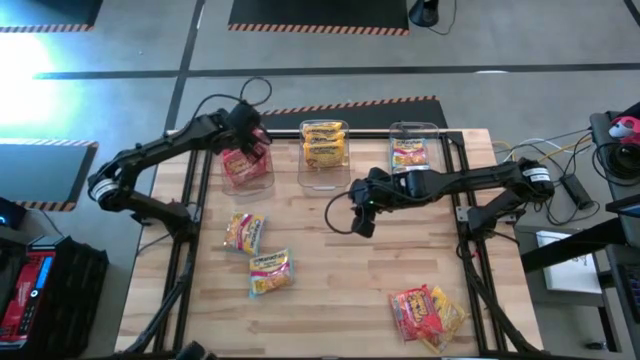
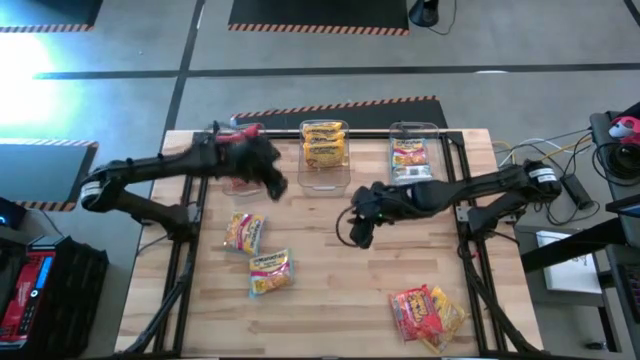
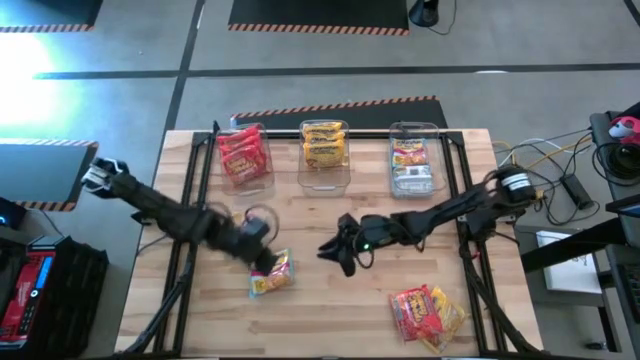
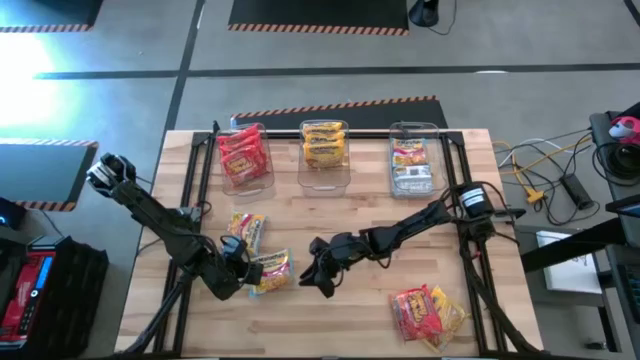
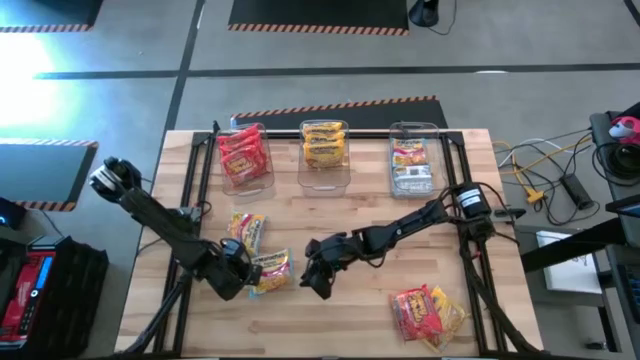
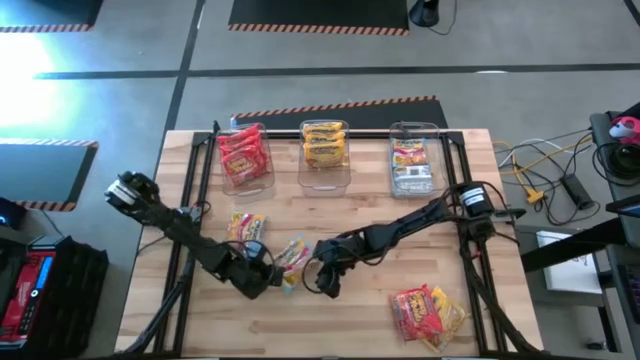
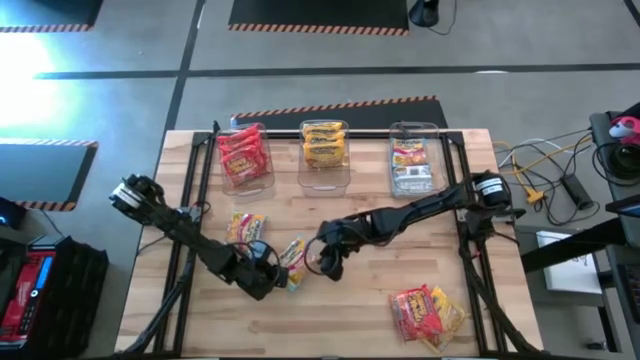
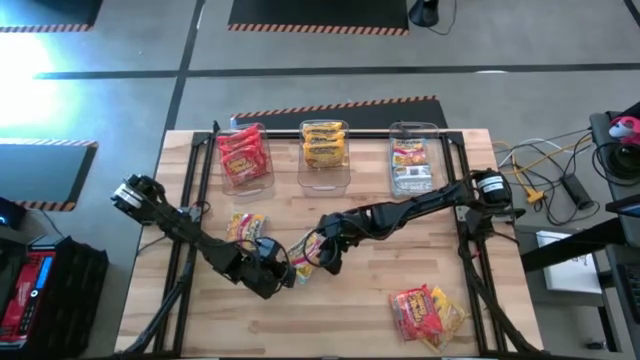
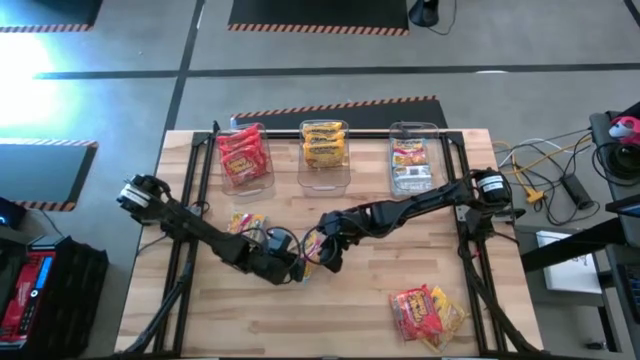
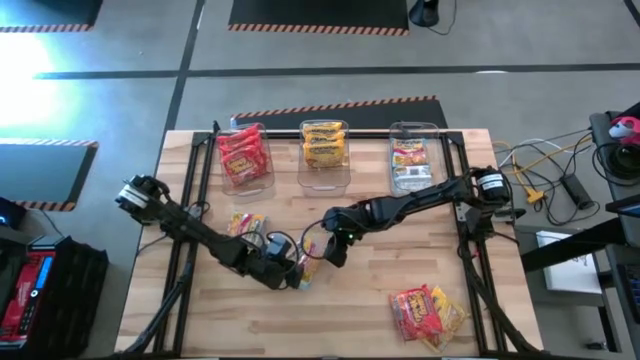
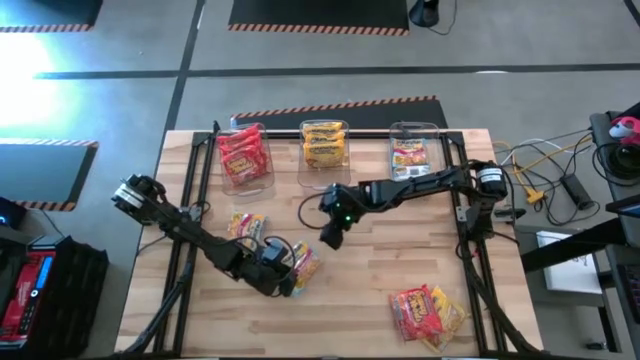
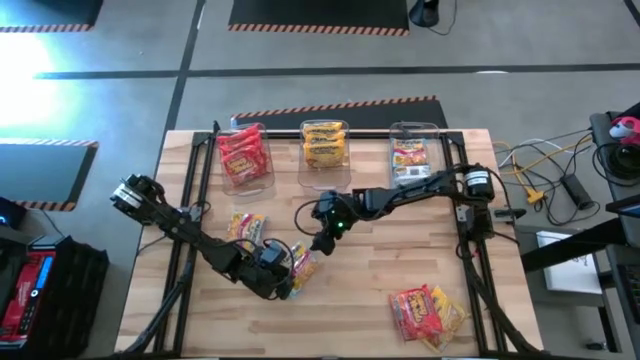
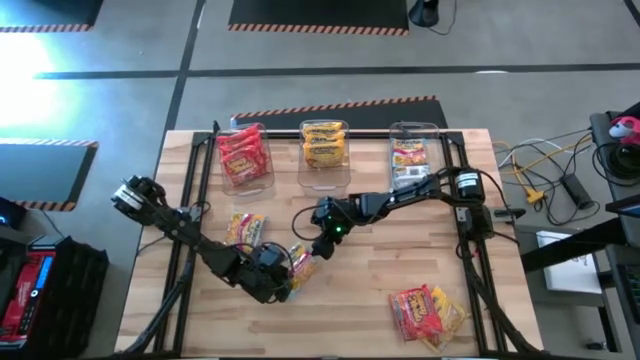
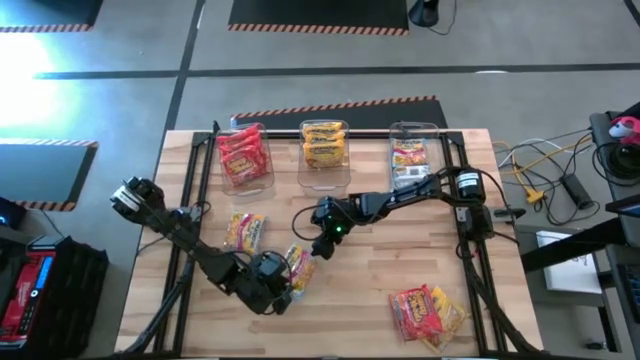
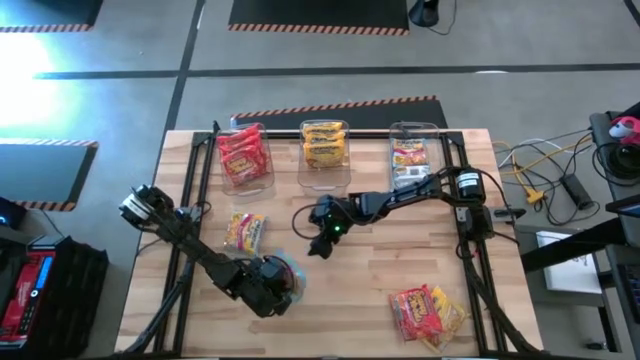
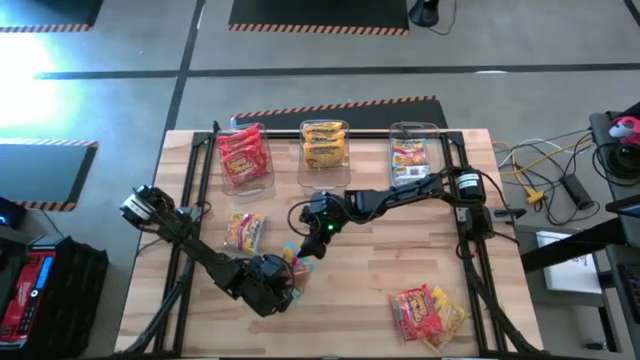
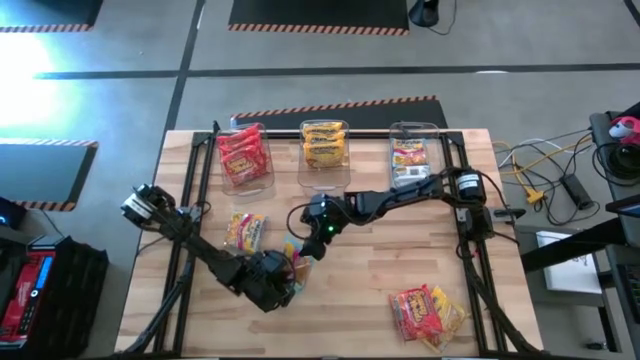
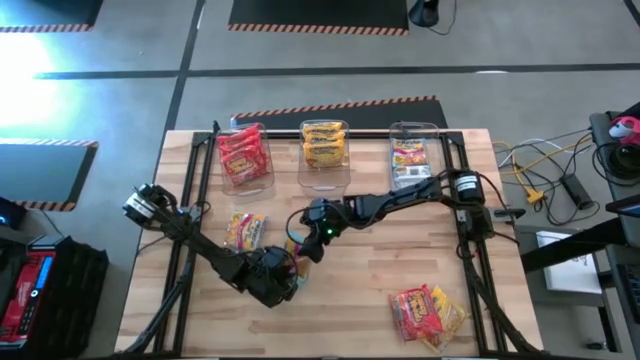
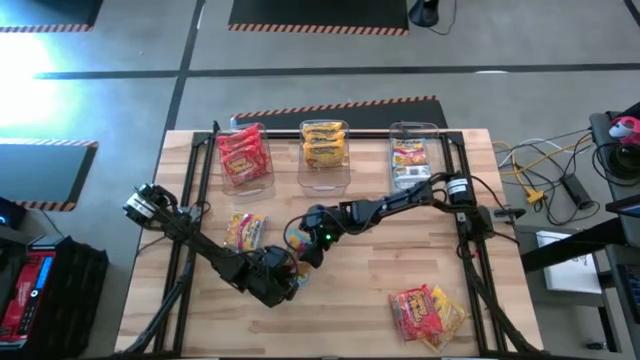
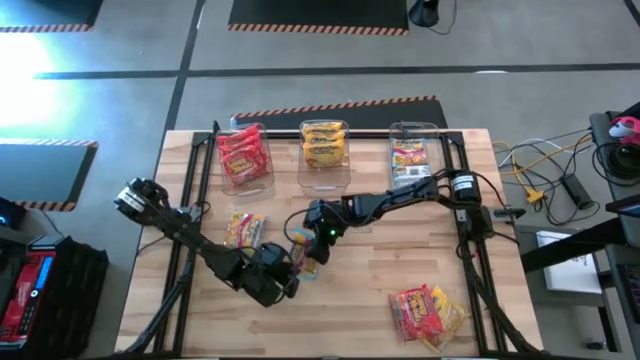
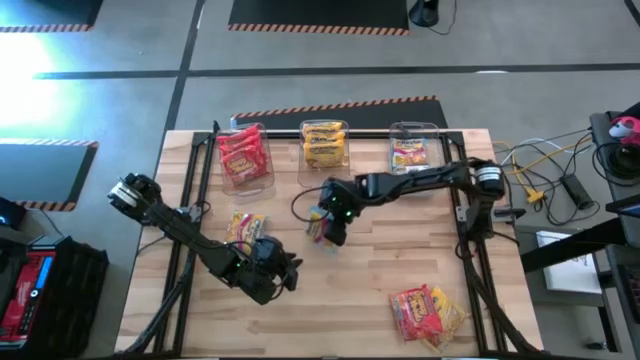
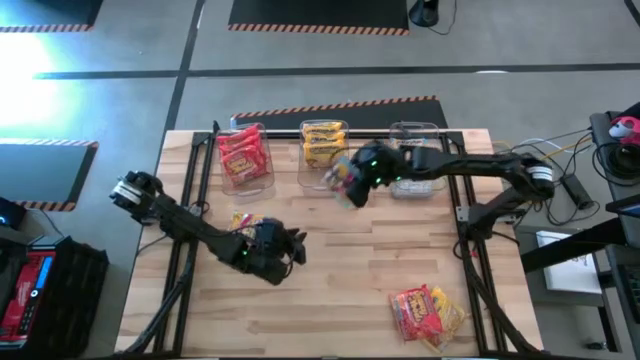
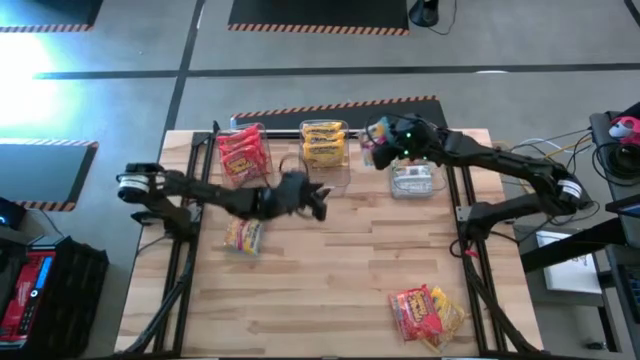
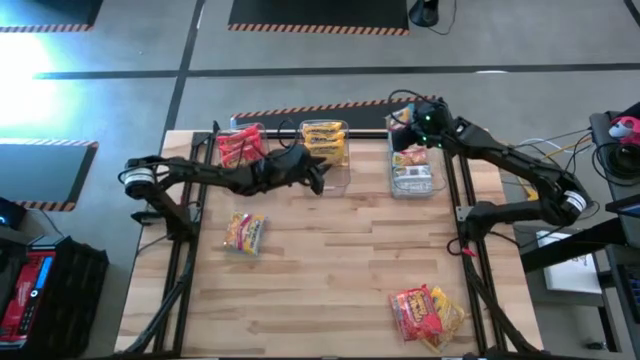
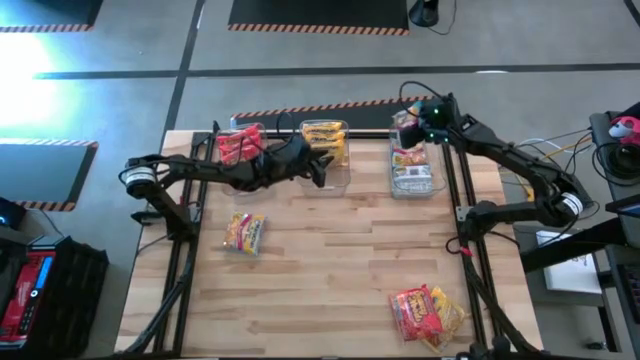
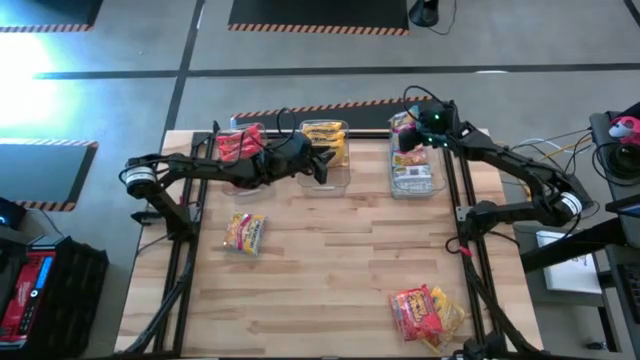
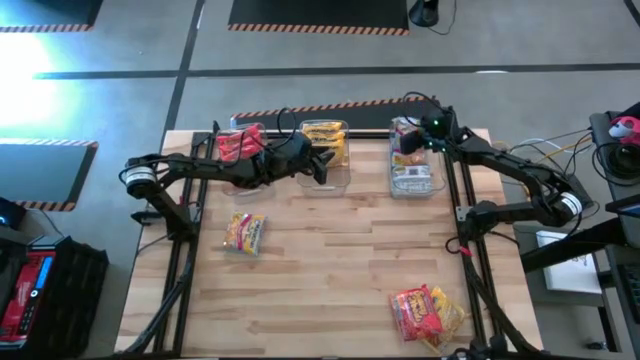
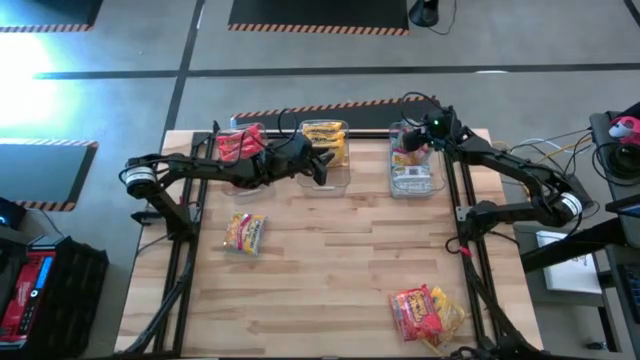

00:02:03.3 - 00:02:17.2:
Task: Sort Maruchan noodles
Put the blue noodle pack into the right transparent bin
